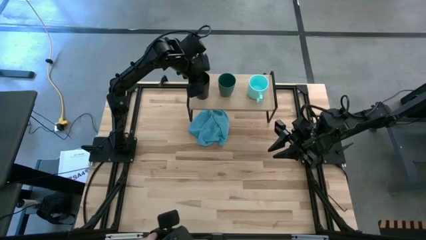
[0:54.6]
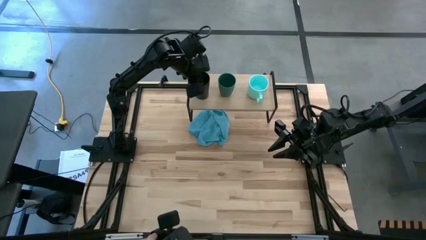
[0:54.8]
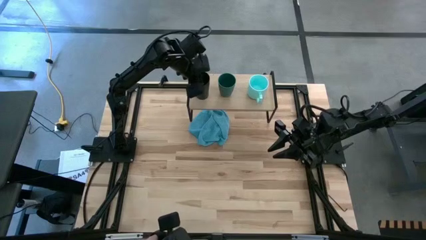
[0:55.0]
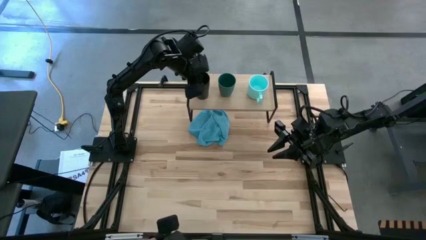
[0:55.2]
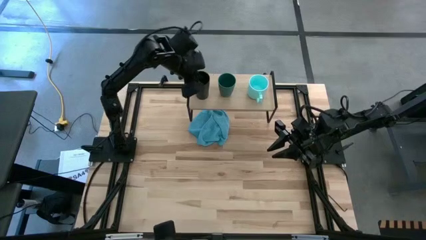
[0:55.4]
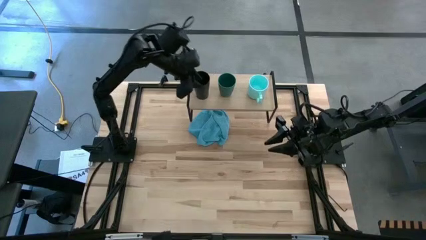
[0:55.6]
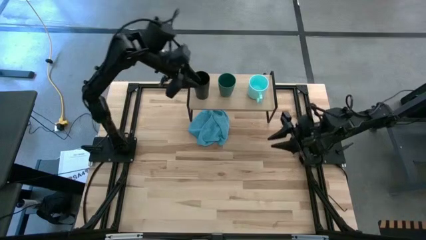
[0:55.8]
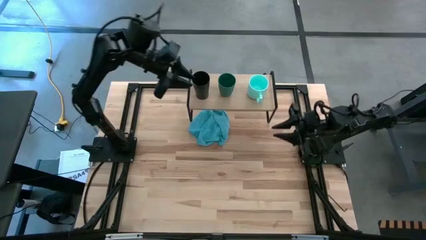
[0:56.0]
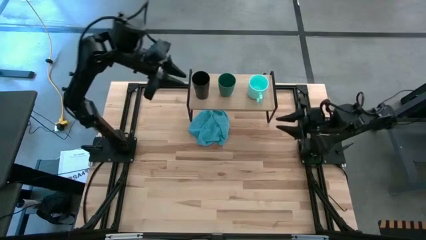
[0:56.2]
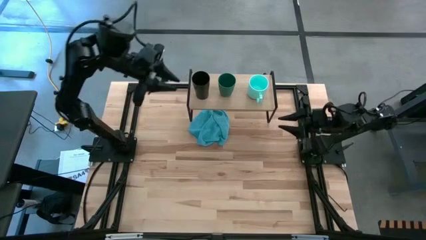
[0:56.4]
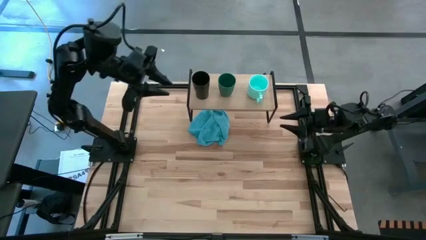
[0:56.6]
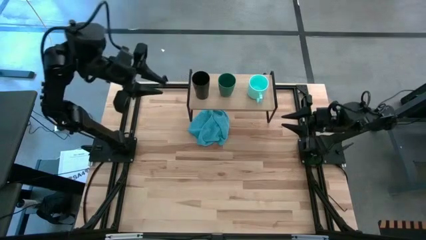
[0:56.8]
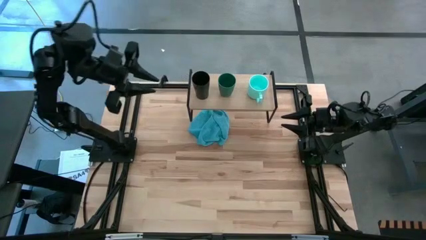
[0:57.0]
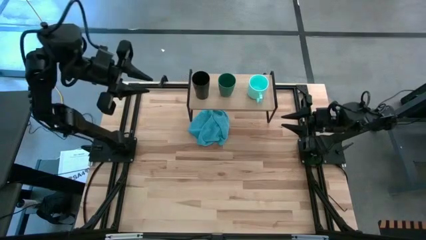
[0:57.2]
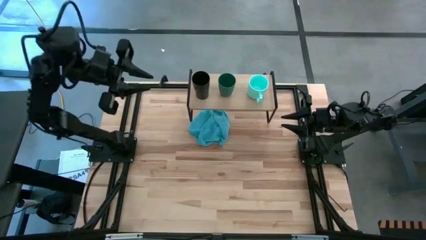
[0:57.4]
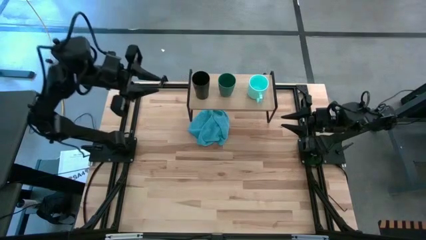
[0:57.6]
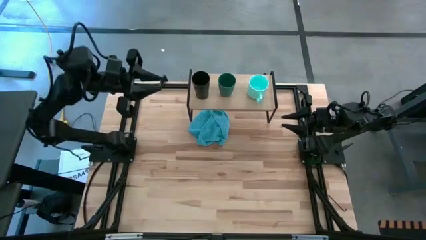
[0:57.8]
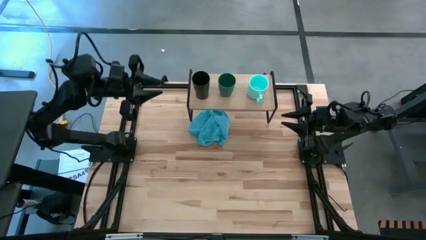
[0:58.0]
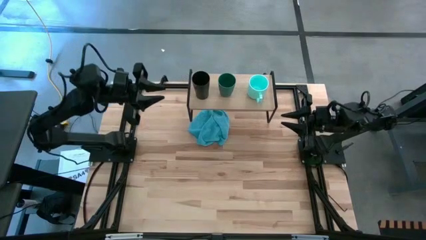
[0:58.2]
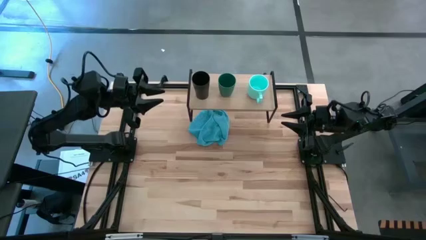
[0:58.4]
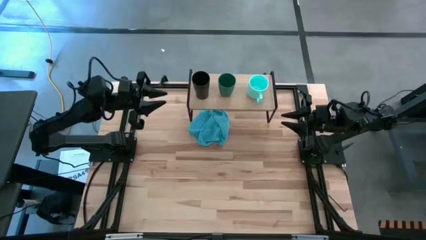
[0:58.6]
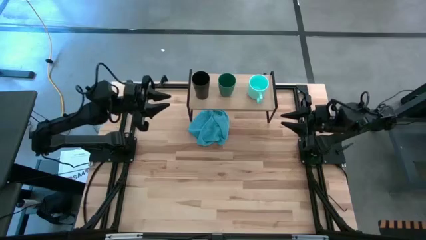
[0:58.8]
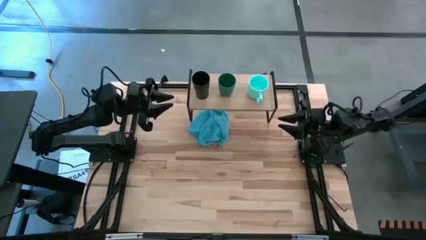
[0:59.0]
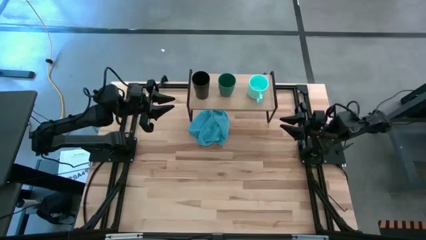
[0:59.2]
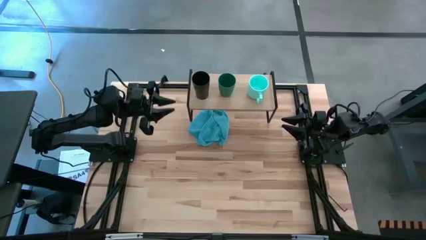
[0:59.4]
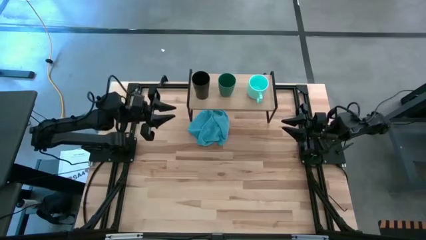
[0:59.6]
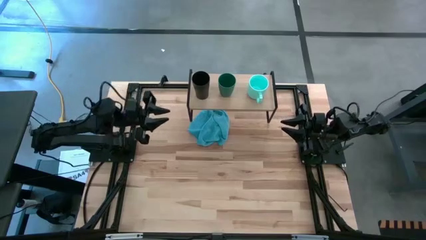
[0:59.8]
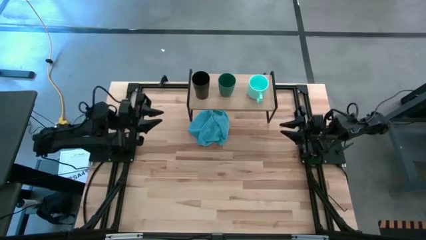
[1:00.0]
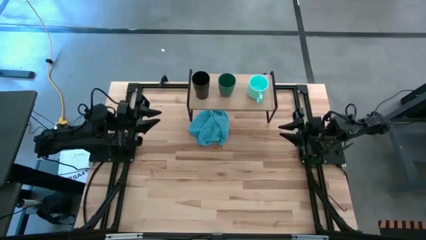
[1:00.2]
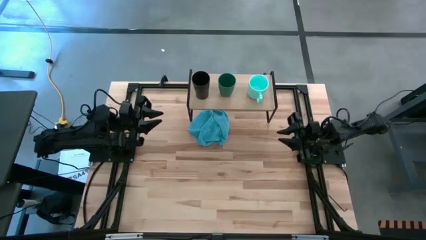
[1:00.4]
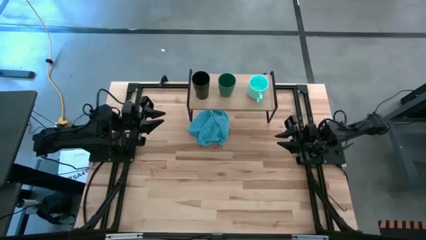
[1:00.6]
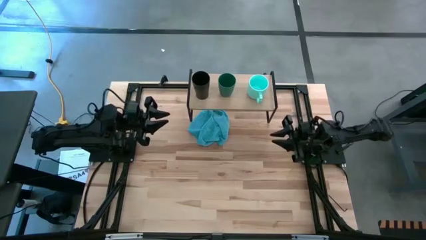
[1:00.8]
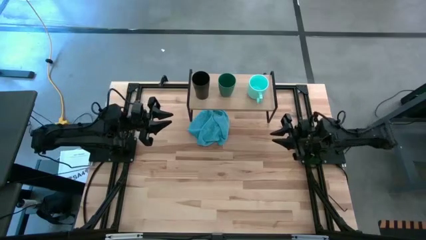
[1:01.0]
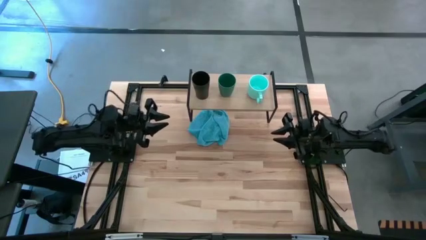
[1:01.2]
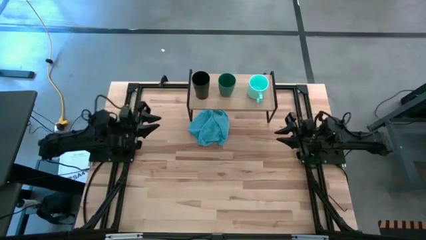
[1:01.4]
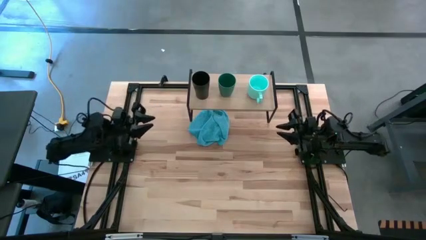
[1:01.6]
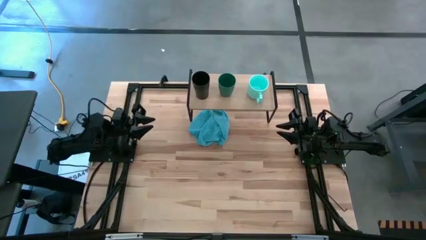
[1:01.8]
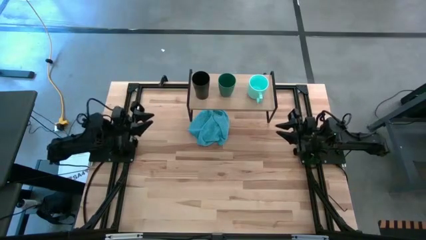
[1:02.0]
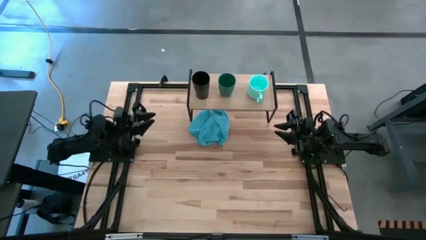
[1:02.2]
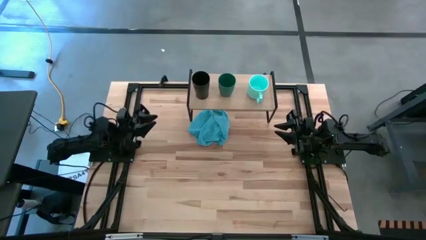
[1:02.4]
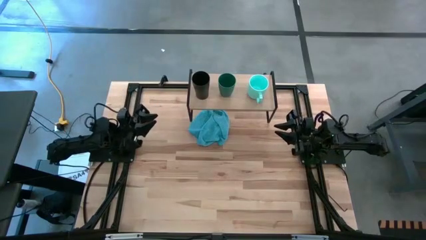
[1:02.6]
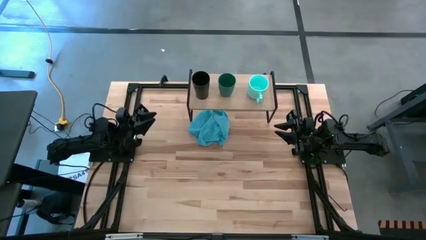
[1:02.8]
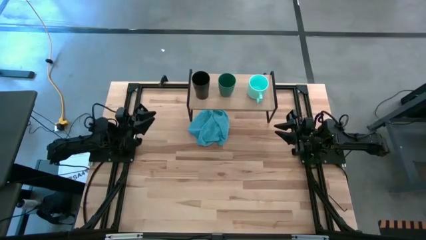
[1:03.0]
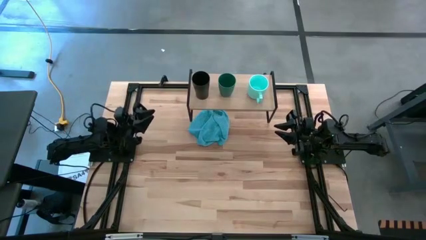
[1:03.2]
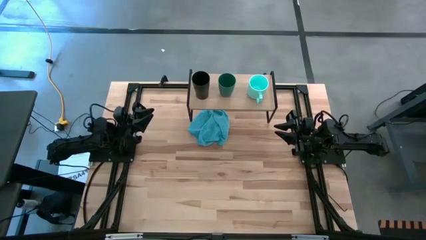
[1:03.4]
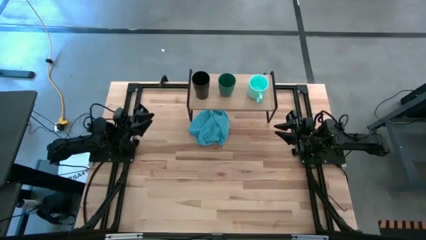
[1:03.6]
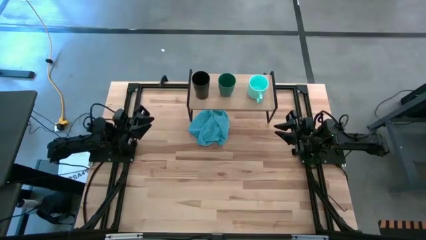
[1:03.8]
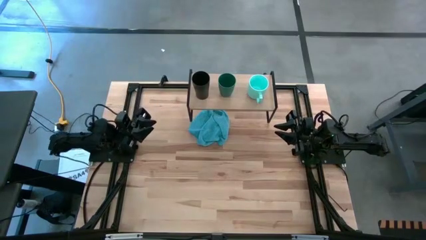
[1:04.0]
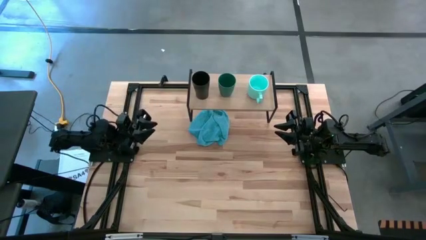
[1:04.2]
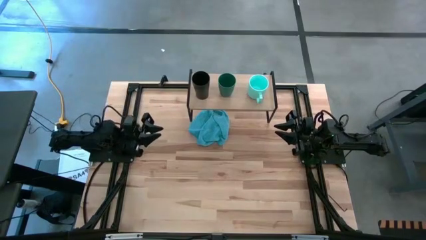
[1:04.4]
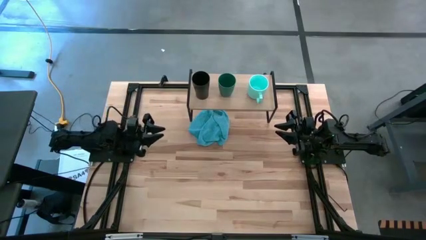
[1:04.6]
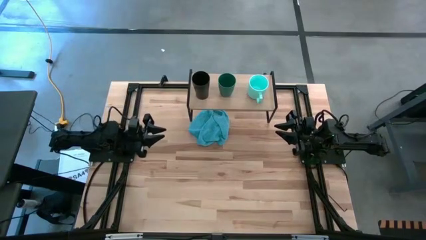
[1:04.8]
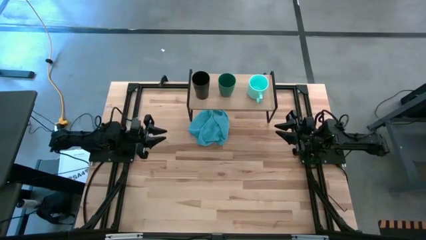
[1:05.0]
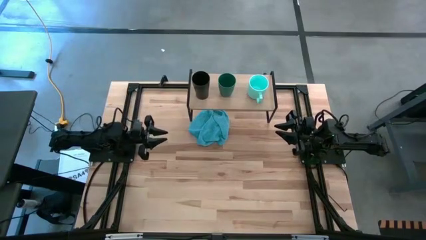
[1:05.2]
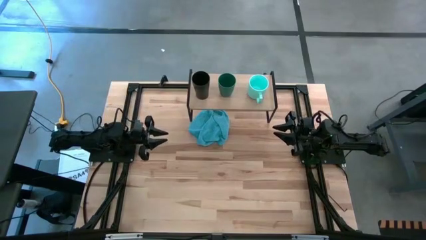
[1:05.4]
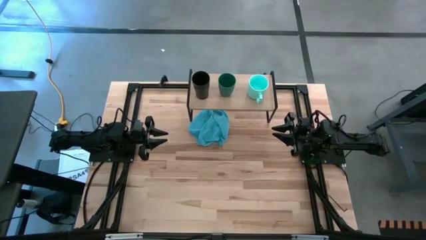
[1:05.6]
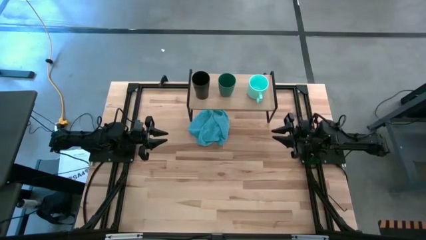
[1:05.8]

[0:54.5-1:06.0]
Task: Stack small to large cups/mugs on shelf
Return to Home Position

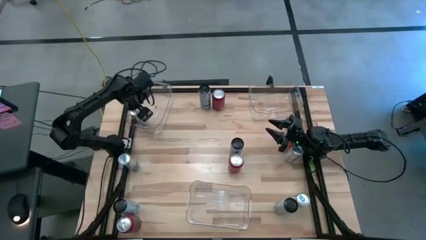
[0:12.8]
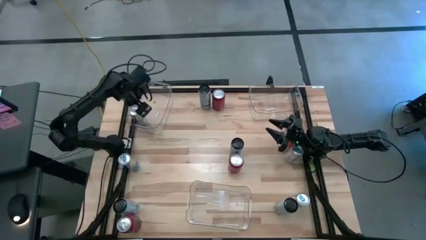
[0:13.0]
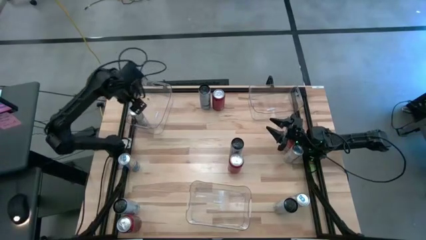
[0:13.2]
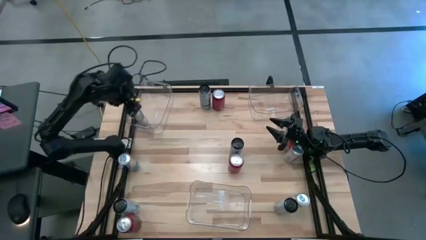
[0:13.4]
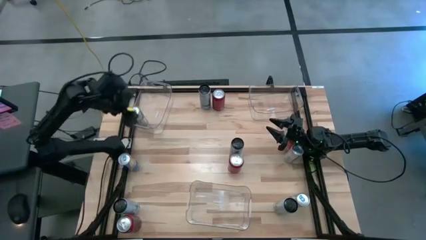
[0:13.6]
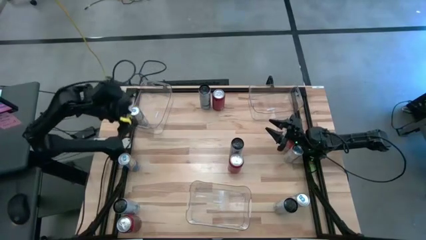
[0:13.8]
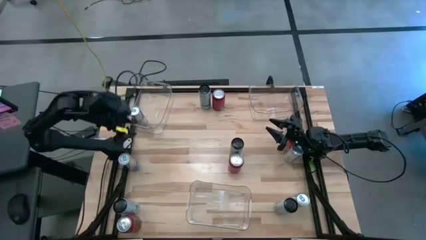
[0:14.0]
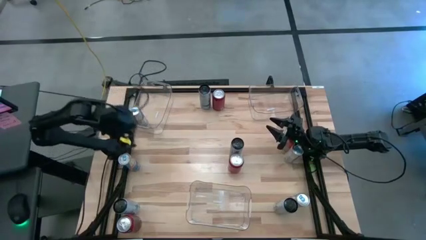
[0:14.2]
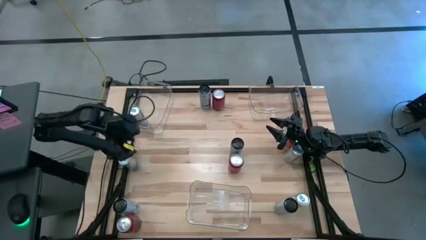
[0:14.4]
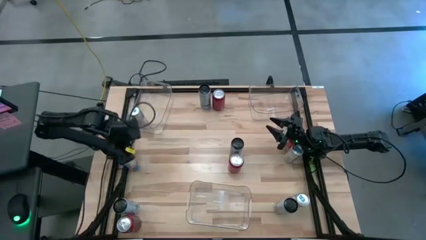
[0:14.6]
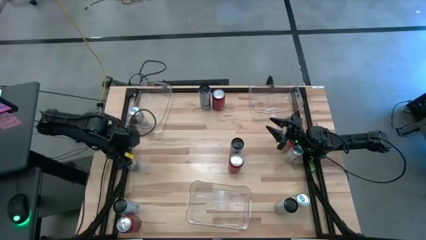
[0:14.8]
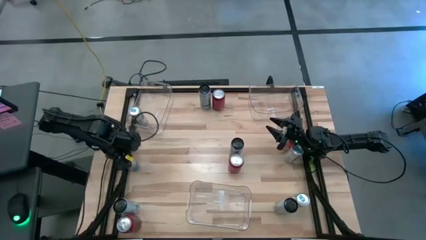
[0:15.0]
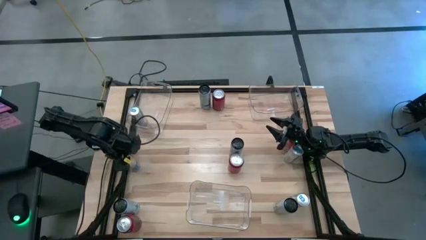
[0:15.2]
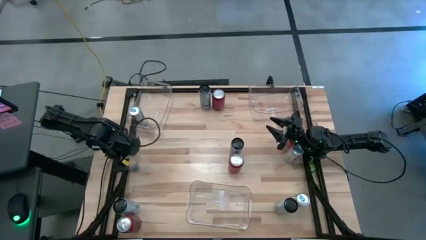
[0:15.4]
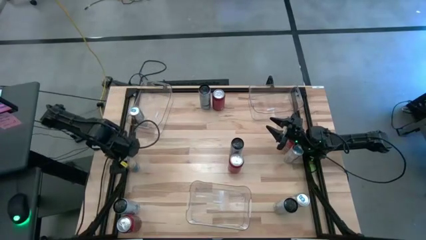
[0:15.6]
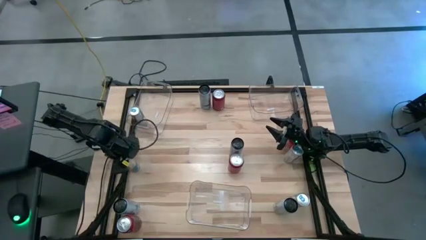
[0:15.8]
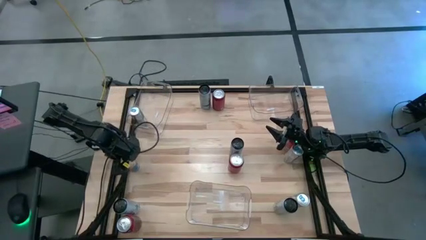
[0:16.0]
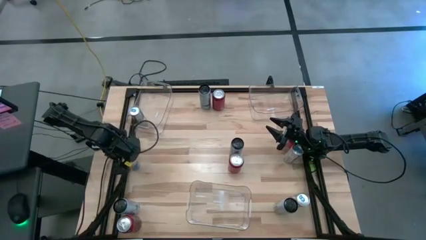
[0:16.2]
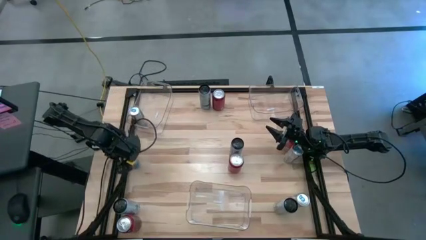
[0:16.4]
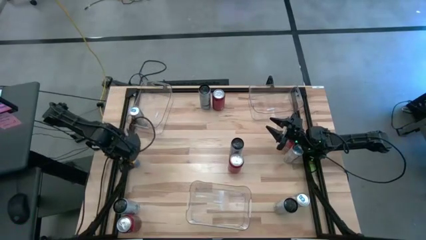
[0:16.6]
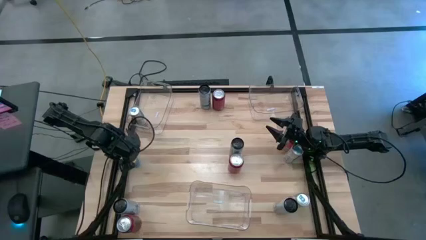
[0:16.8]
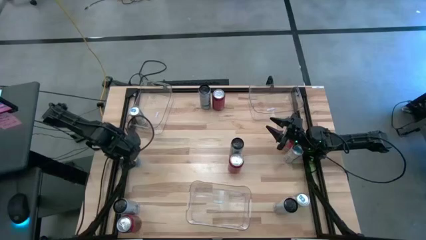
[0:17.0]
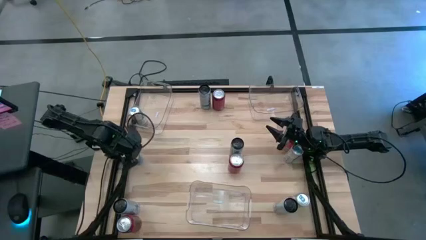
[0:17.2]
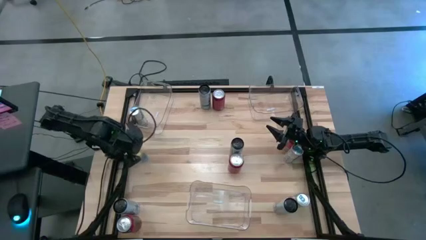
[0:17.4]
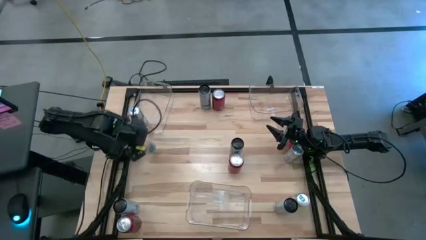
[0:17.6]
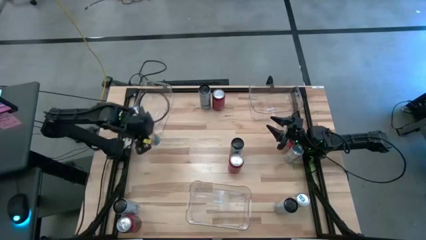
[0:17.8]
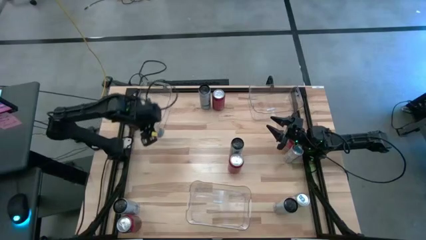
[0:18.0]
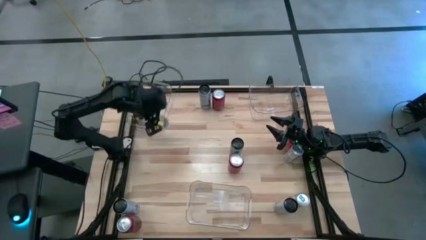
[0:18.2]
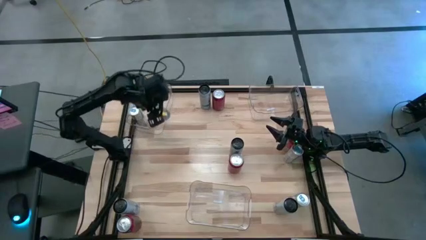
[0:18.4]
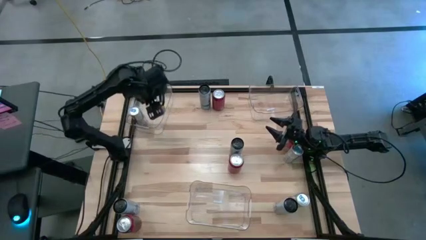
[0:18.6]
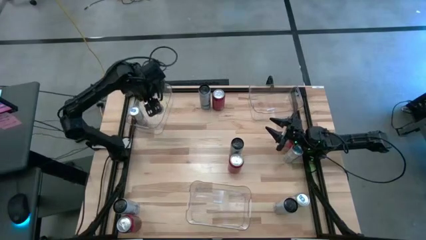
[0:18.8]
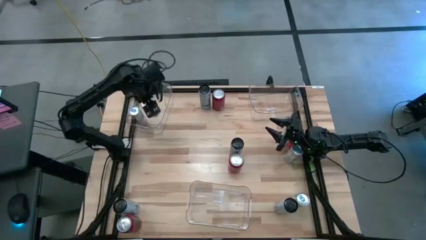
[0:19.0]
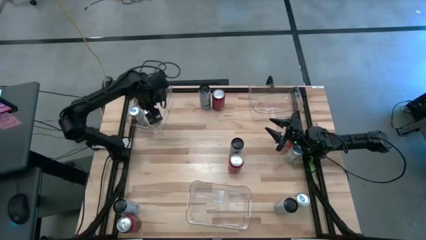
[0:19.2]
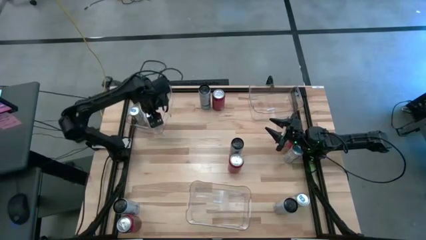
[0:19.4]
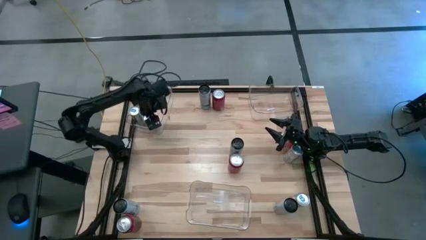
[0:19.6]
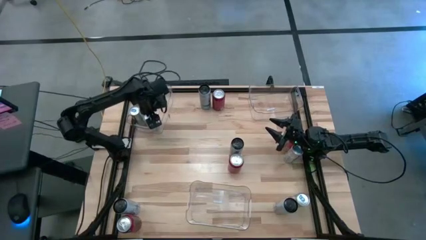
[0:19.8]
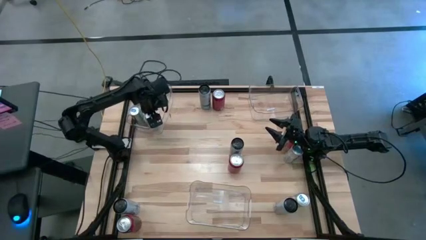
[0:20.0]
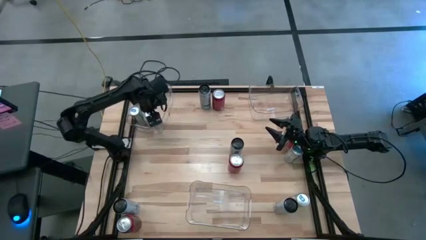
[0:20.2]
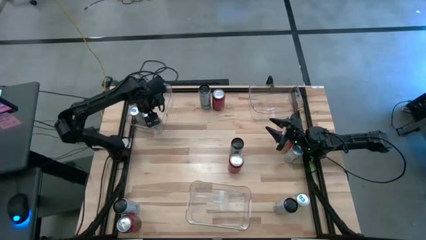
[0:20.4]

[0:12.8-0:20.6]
Task: Sort soda cans
Put the blue soda can into the top left transparent bin
